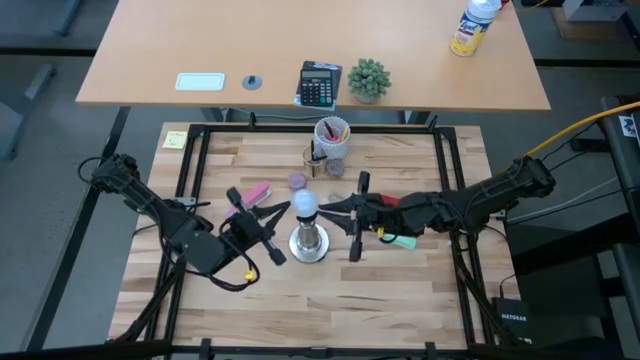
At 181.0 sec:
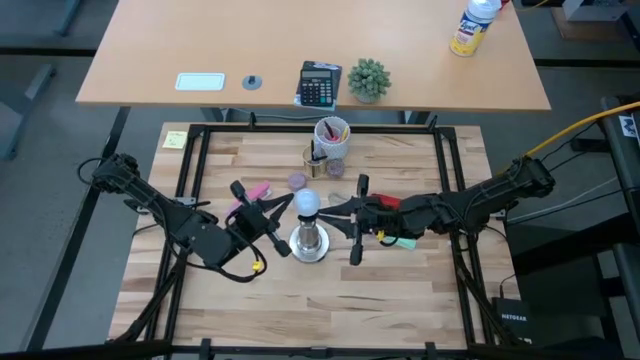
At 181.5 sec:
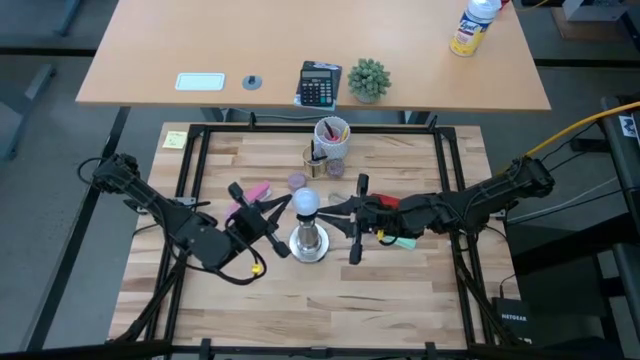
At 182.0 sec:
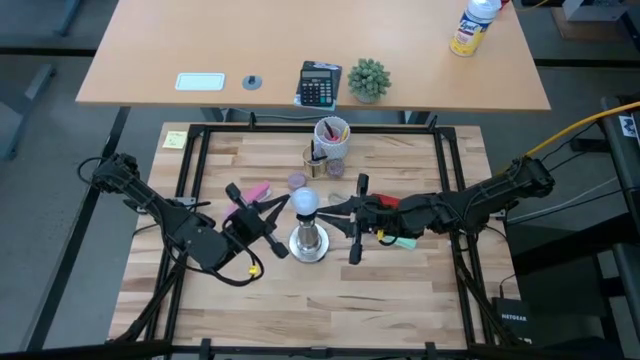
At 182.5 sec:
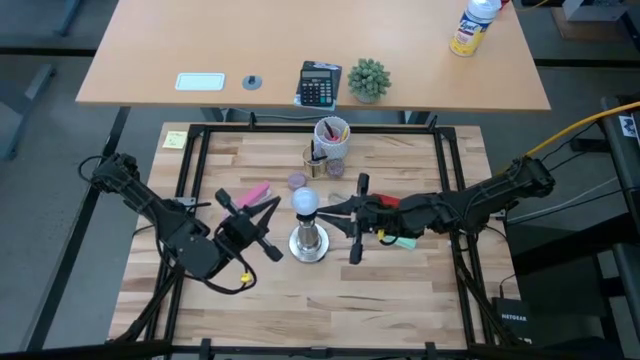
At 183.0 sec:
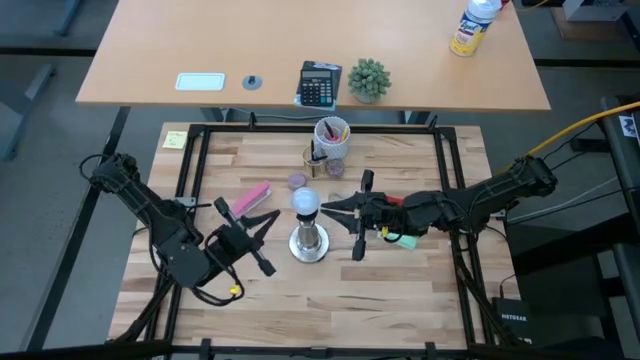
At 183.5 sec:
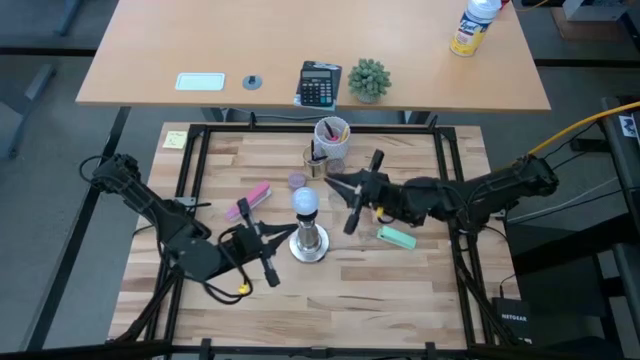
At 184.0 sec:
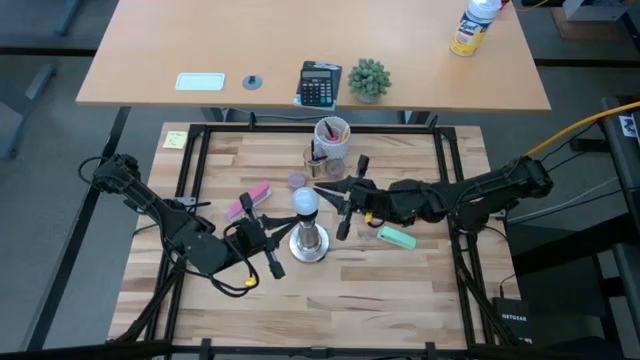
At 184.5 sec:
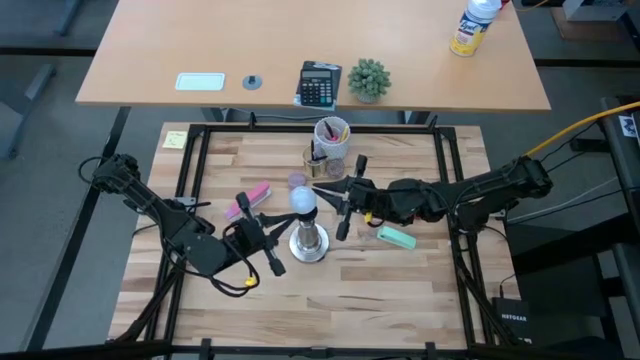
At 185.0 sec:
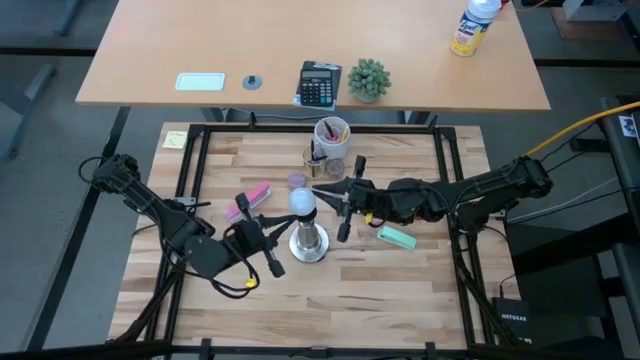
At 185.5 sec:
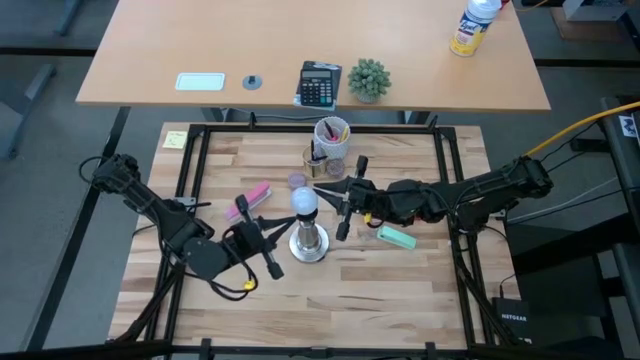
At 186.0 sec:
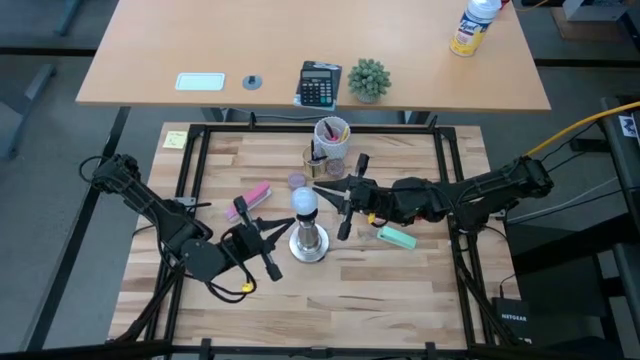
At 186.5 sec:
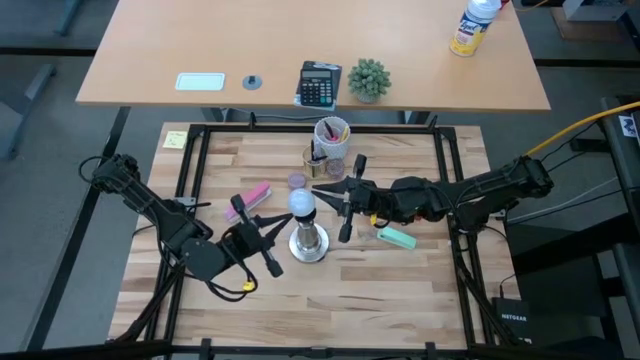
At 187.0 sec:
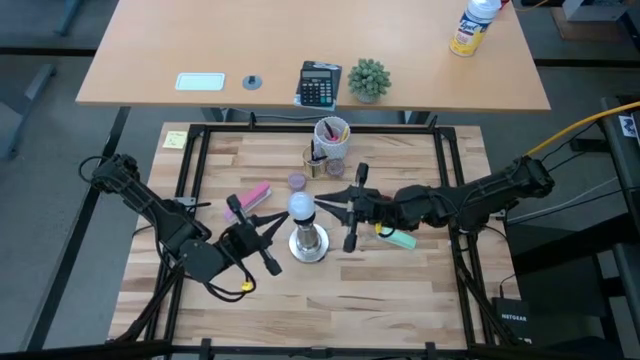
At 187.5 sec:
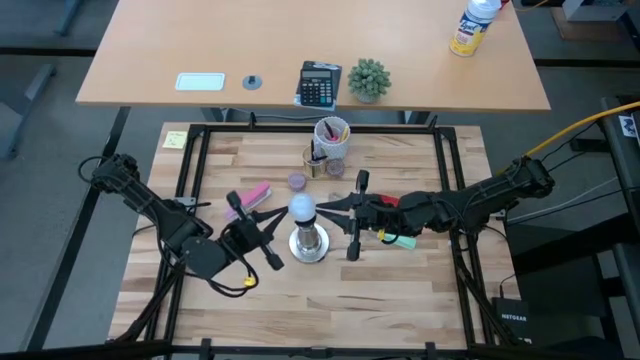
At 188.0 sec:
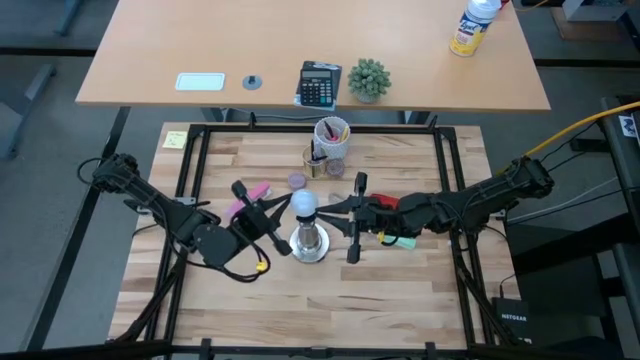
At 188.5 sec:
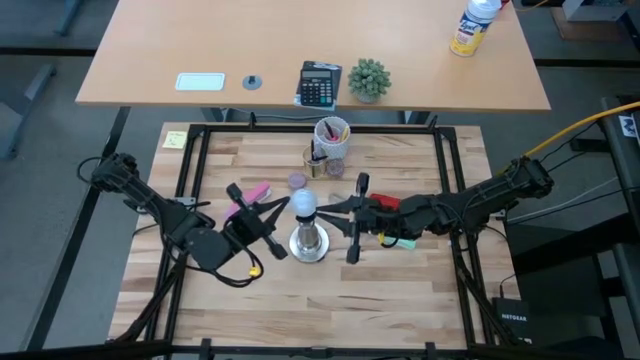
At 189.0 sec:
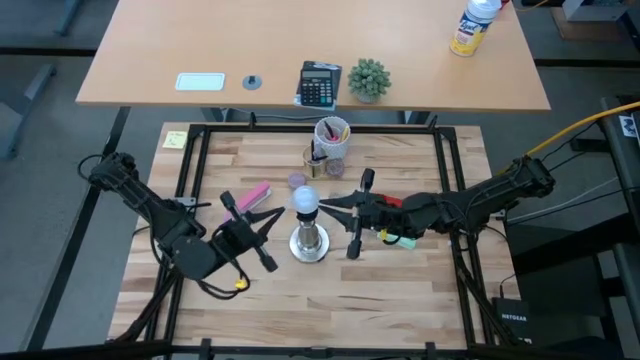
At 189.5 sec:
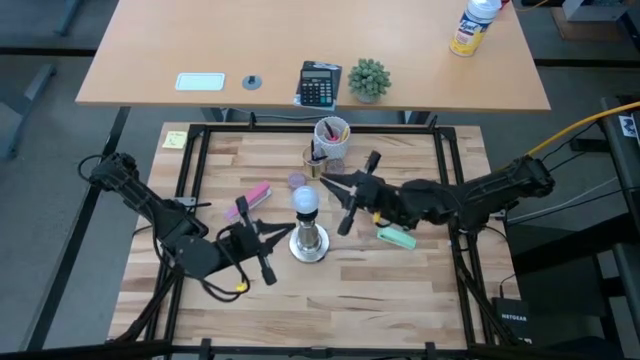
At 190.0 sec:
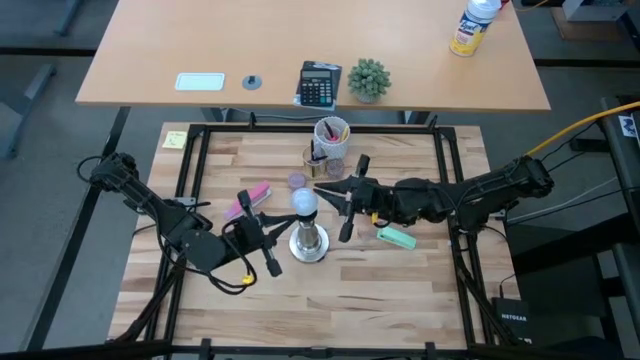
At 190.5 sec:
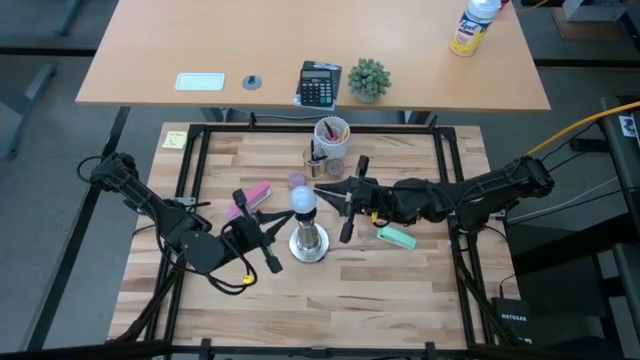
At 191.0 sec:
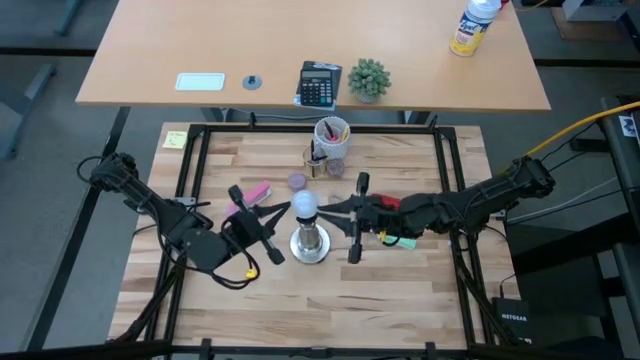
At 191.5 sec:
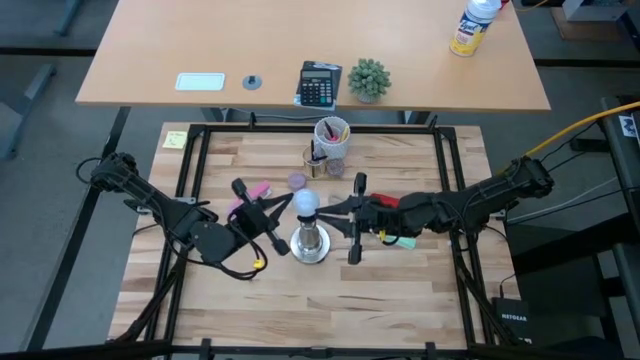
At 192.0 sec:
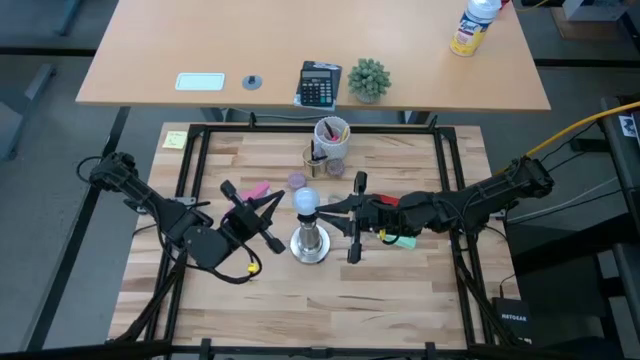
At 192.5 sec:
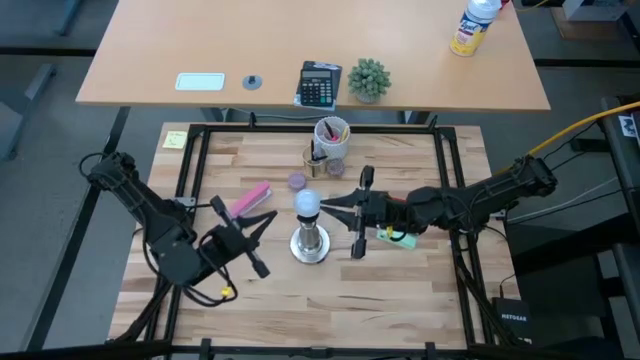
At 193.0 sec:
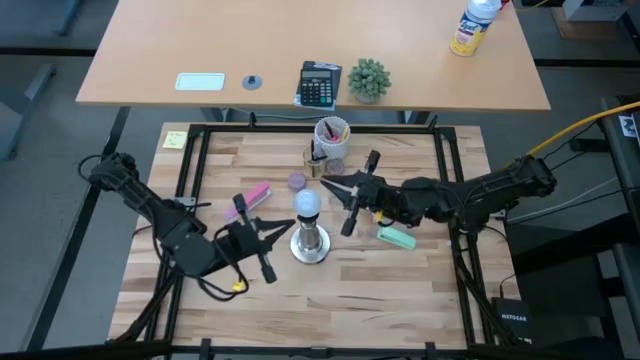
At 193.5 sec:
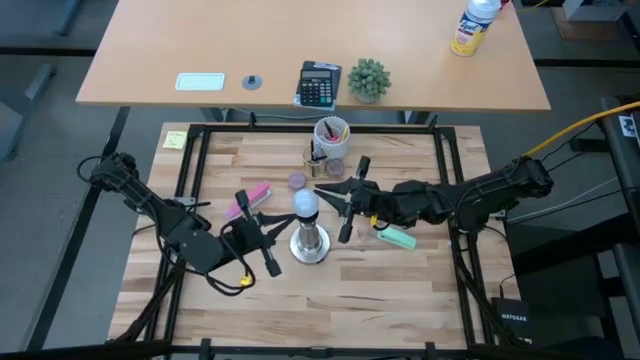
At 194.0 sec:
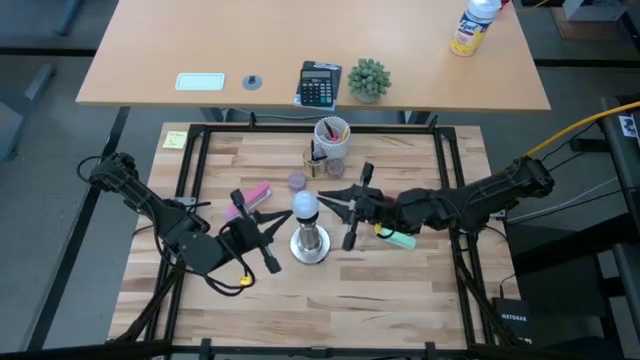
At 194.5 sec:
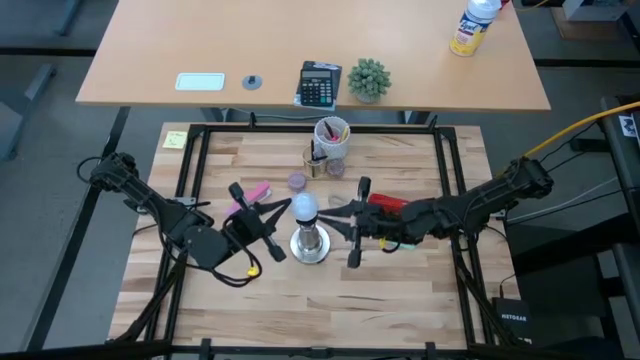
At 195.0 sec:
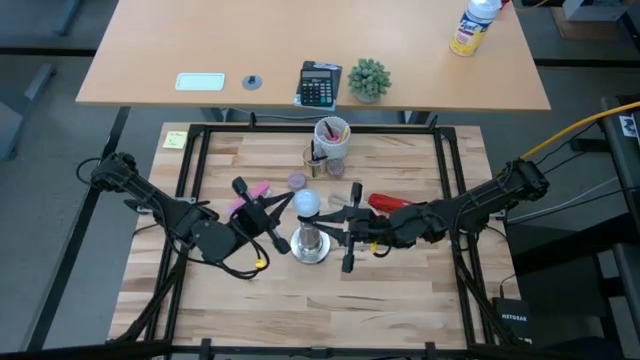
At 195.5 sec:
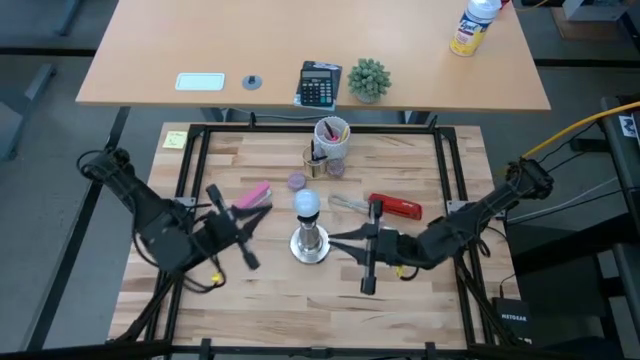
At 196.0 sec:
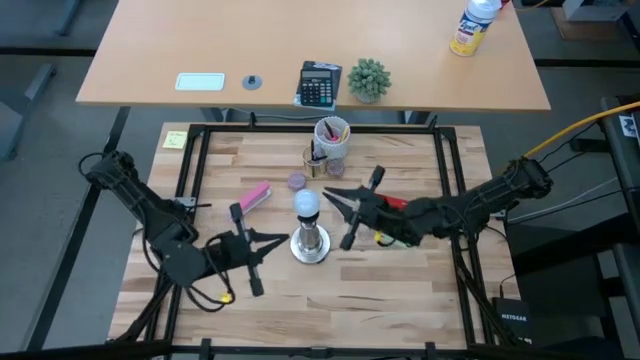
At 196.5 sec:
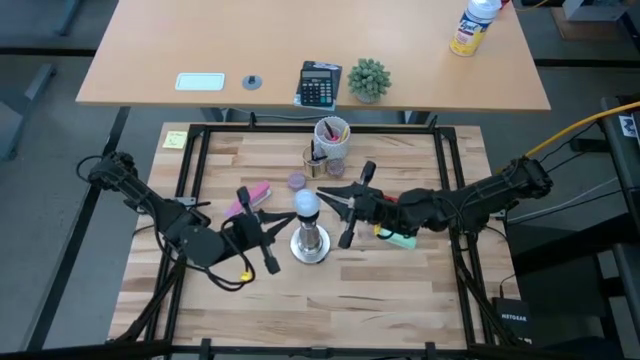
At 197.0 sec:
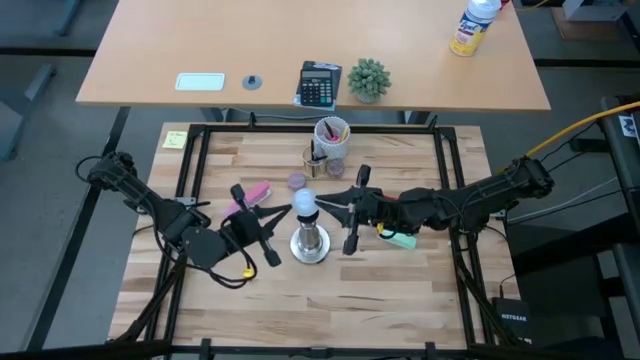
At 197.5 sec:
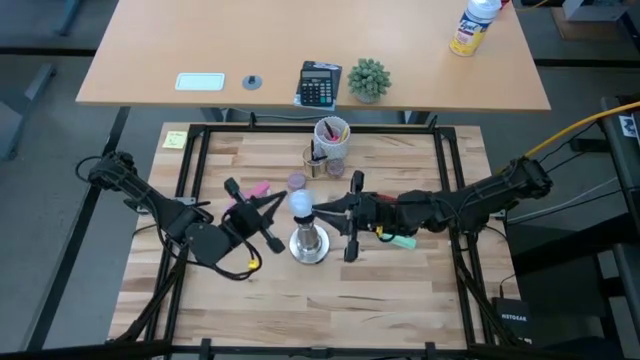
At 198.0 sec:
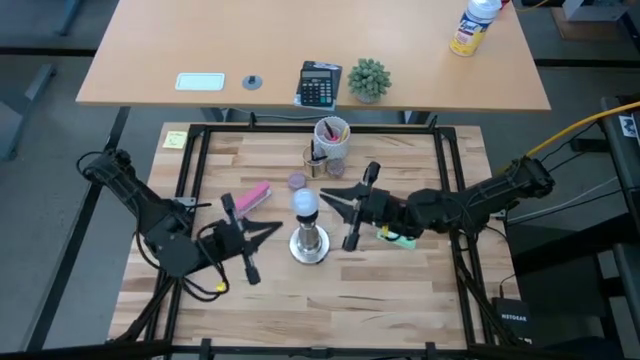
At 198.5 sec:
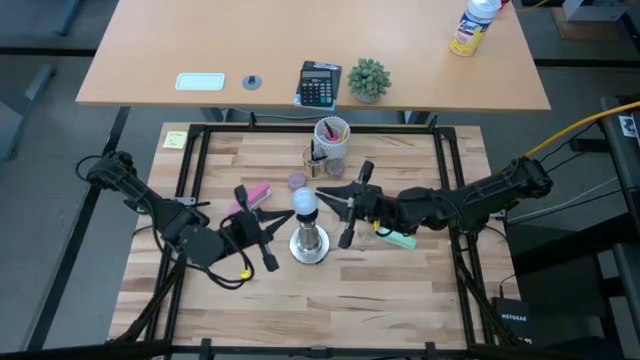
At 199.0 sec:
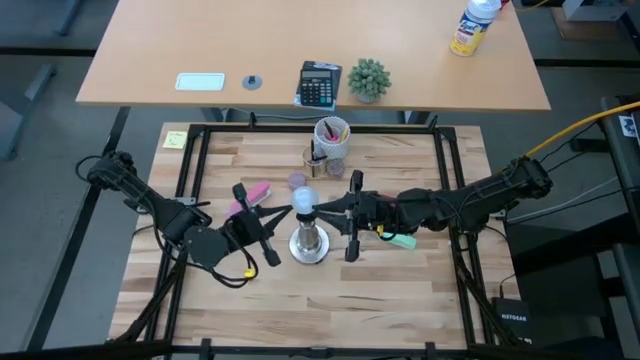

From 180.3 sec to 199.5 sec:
Task: Screw lightbulb
Insert the lightbulb into the lamp socket

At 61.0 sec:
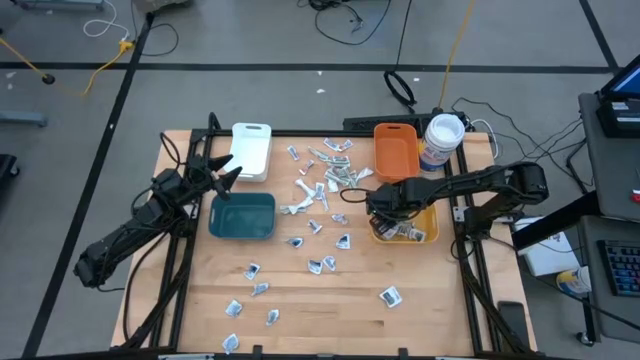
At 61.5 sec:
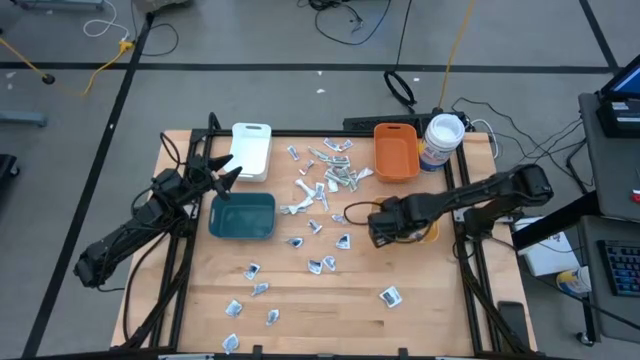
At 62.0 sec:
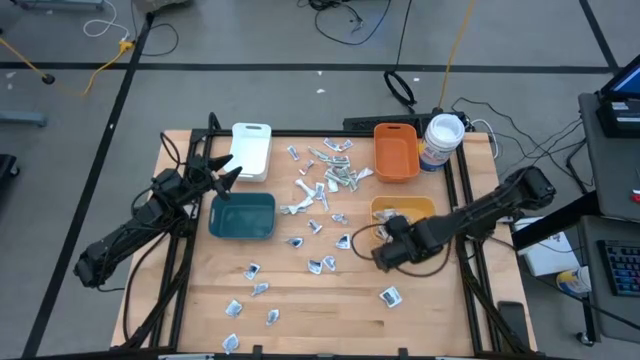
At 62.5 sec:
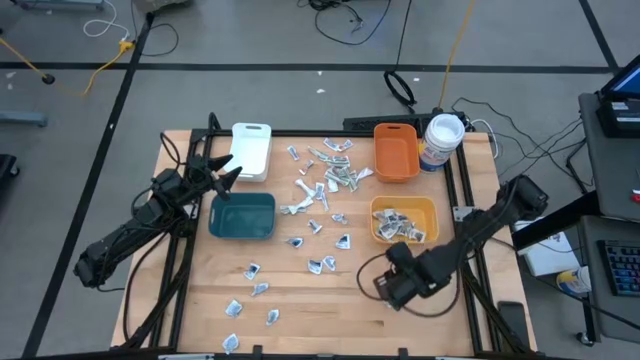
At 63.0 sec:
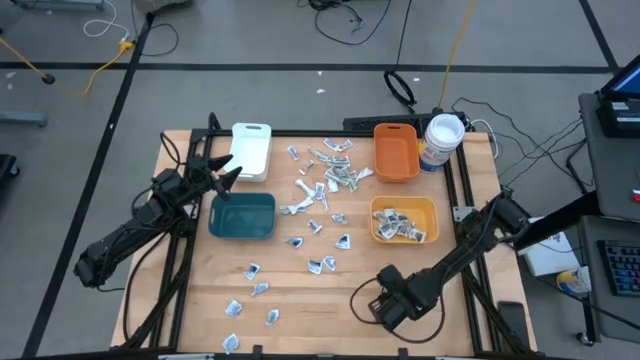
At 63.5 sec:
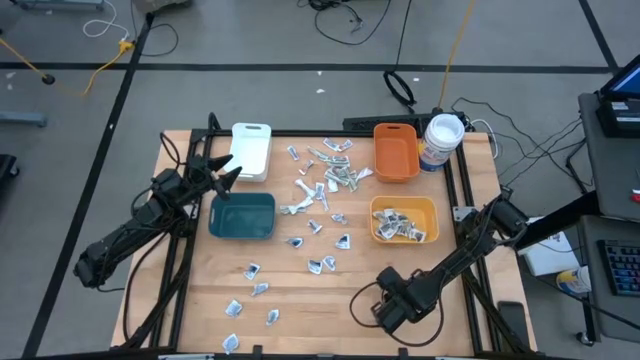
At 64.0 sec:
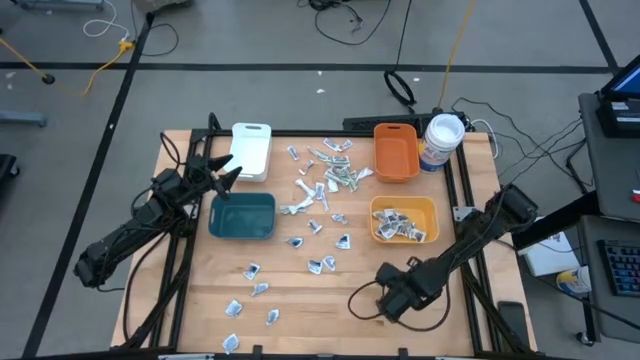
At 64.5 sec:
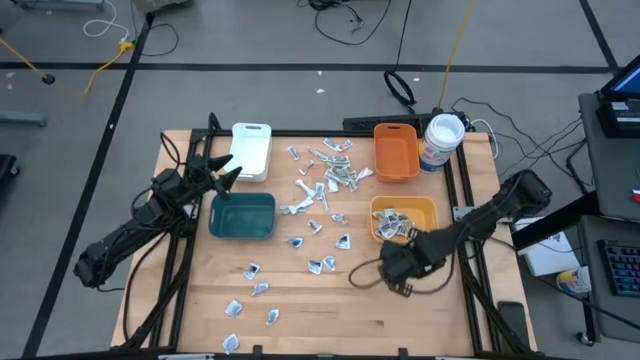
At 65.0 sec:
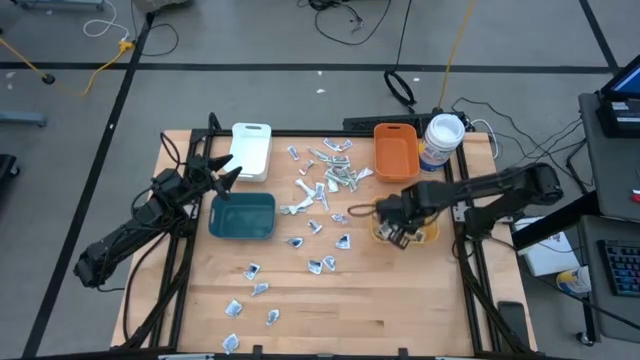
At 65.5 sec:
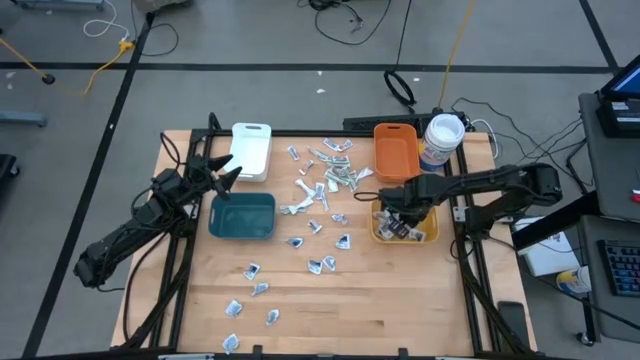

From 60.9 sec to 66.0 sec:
Task: Pick & Place First Aid Supplies
Put the antiseptic towelette into the yellow bin
